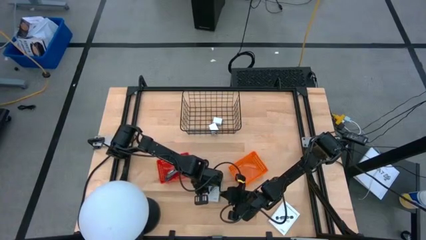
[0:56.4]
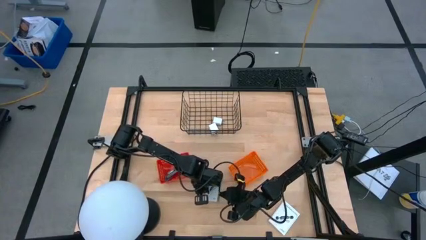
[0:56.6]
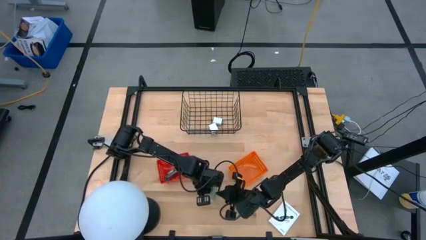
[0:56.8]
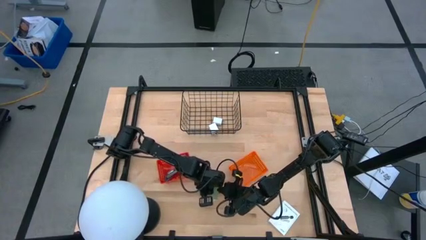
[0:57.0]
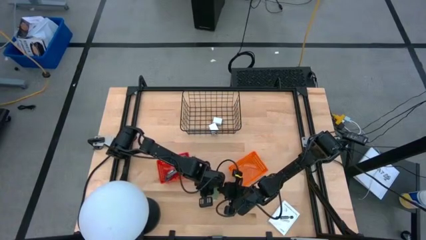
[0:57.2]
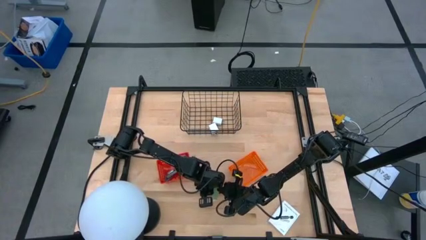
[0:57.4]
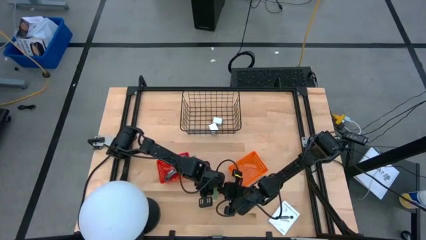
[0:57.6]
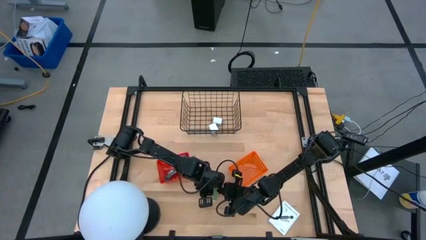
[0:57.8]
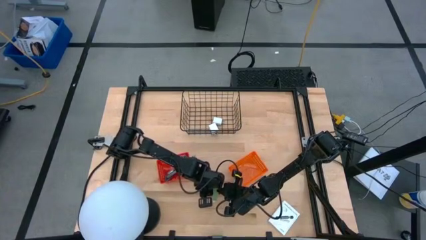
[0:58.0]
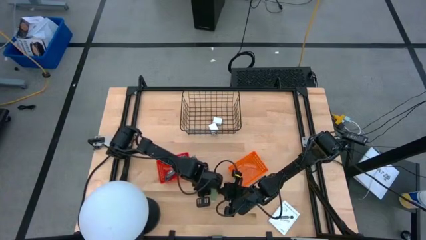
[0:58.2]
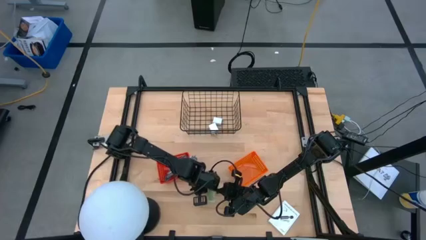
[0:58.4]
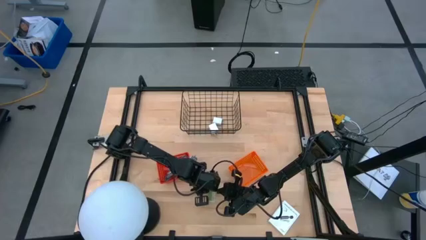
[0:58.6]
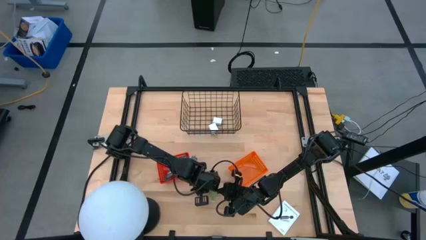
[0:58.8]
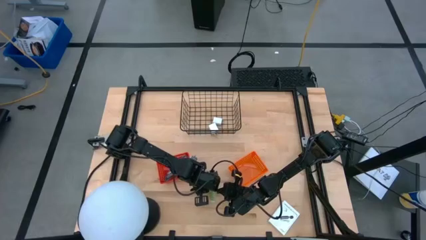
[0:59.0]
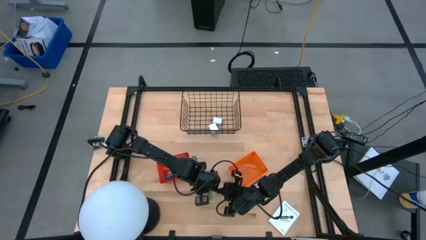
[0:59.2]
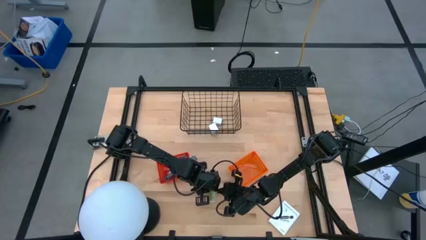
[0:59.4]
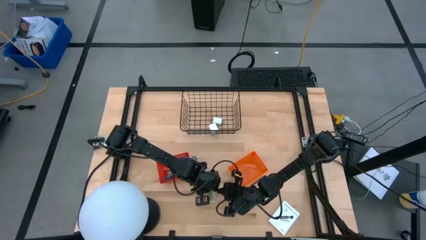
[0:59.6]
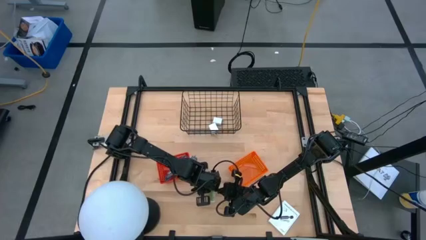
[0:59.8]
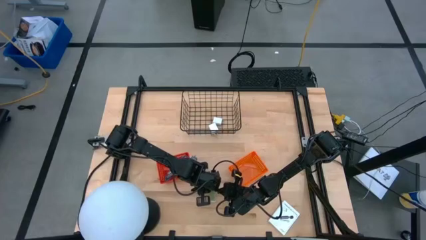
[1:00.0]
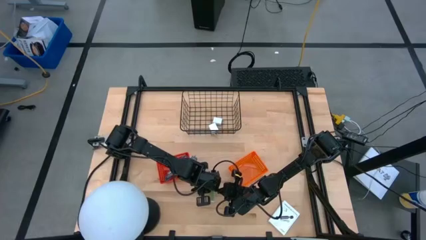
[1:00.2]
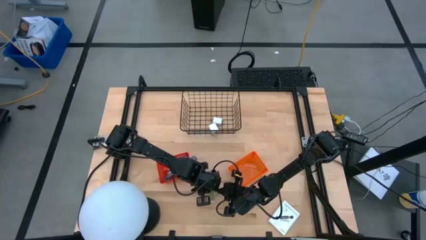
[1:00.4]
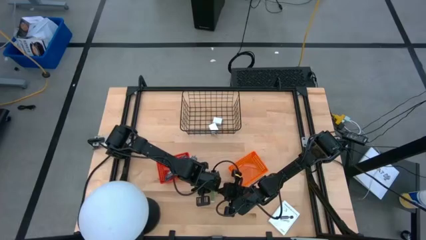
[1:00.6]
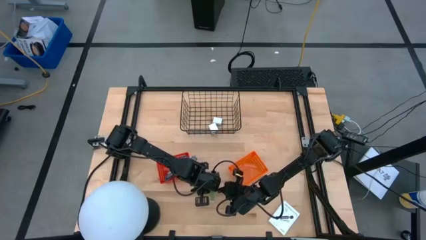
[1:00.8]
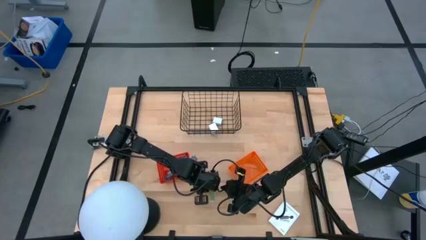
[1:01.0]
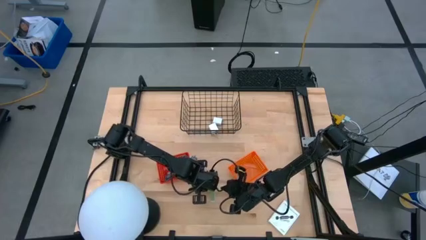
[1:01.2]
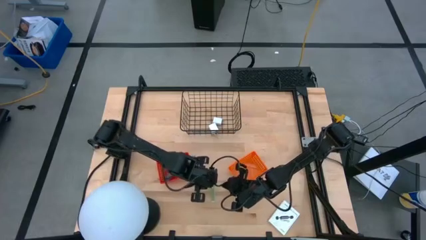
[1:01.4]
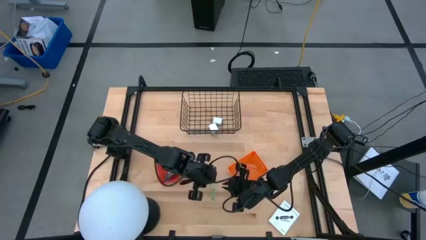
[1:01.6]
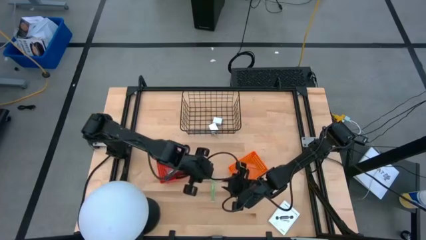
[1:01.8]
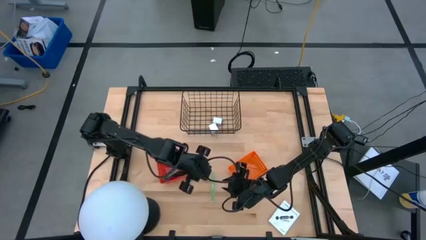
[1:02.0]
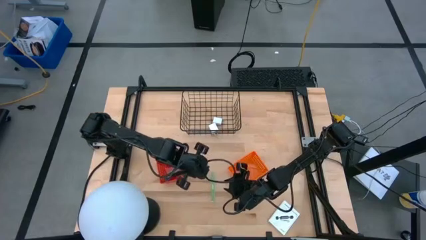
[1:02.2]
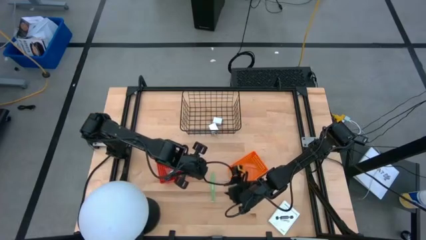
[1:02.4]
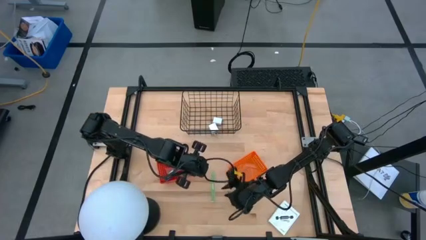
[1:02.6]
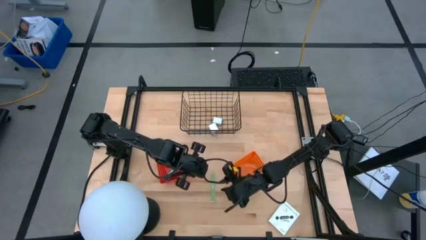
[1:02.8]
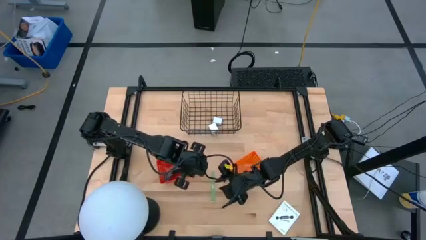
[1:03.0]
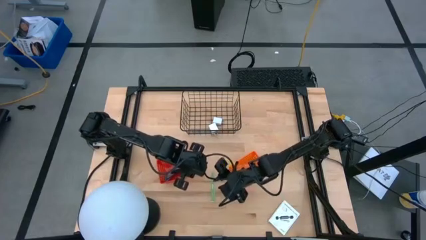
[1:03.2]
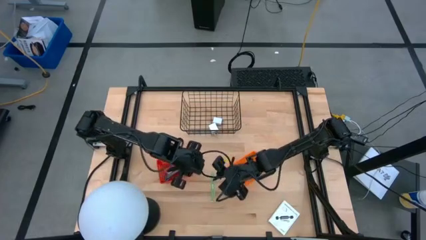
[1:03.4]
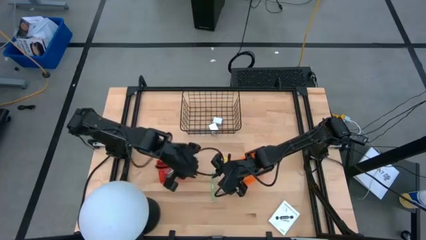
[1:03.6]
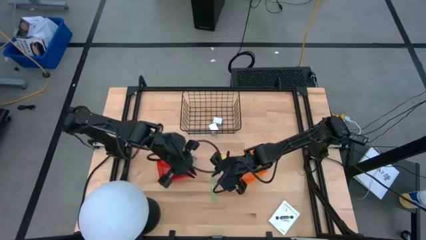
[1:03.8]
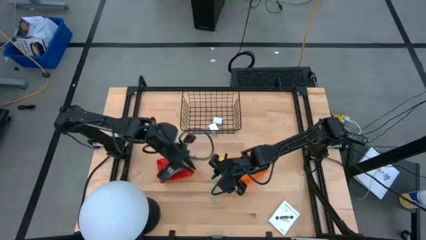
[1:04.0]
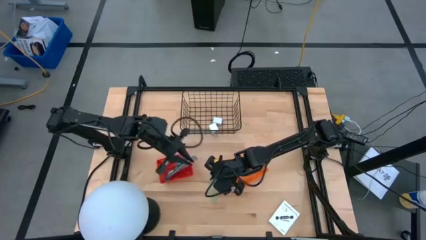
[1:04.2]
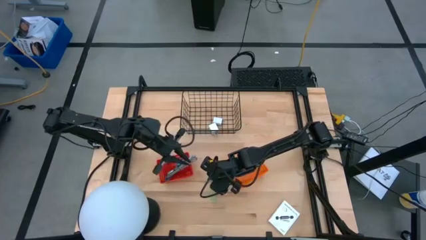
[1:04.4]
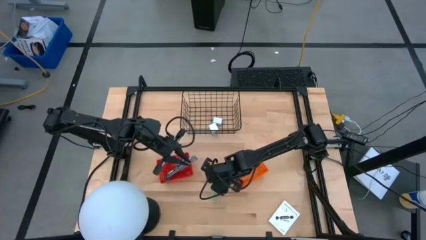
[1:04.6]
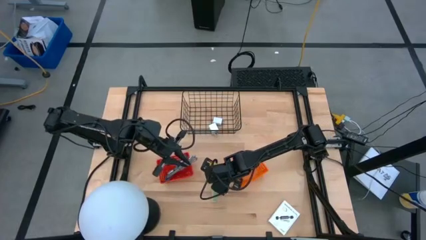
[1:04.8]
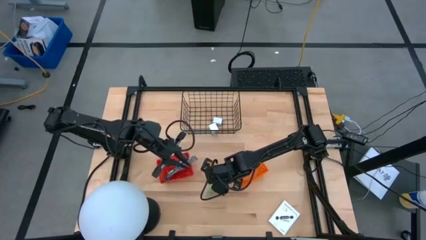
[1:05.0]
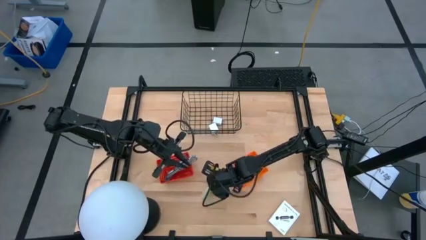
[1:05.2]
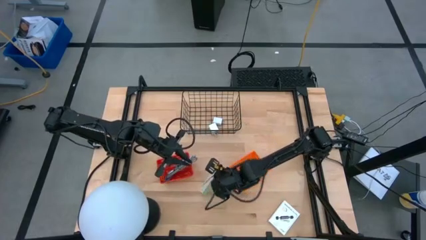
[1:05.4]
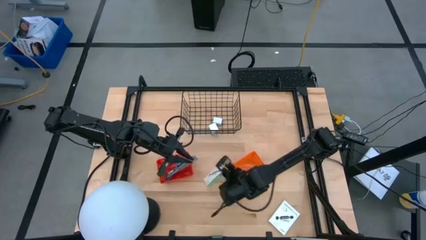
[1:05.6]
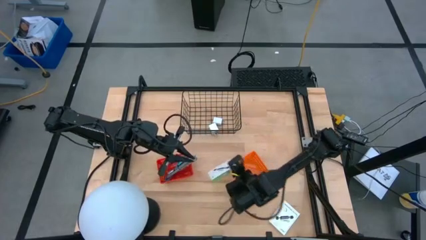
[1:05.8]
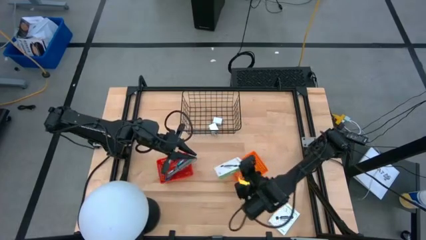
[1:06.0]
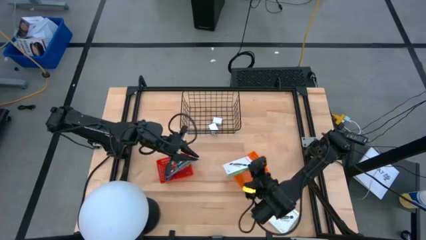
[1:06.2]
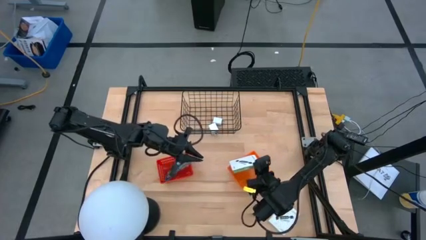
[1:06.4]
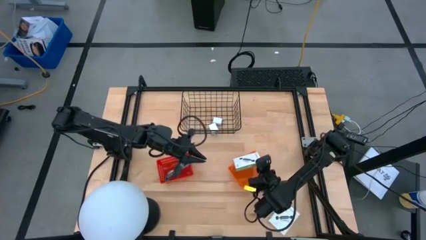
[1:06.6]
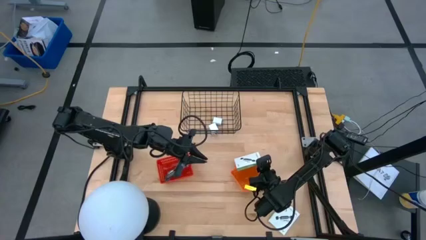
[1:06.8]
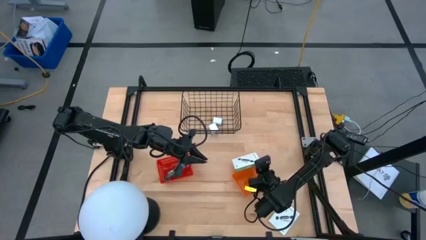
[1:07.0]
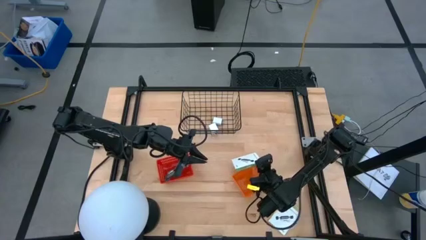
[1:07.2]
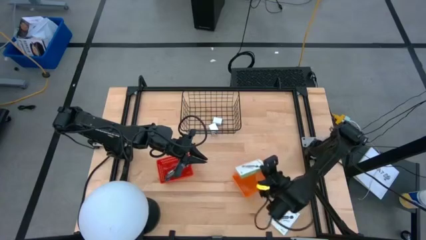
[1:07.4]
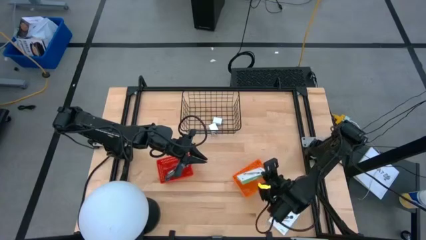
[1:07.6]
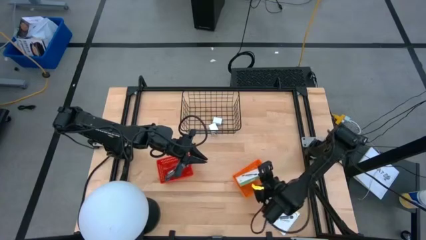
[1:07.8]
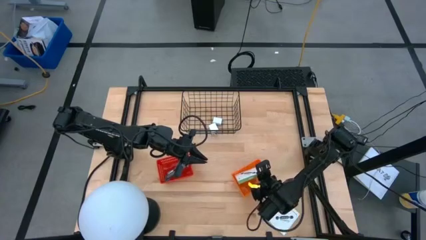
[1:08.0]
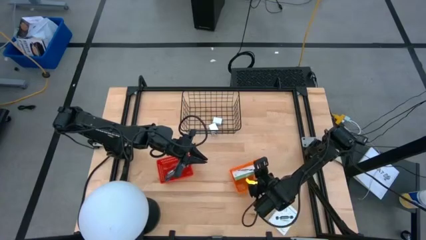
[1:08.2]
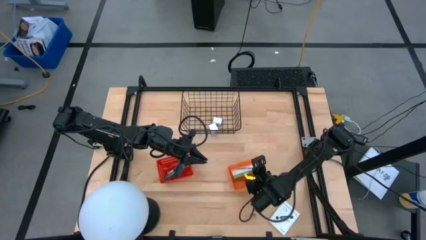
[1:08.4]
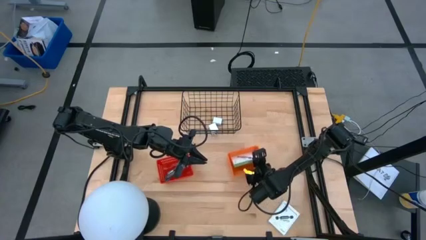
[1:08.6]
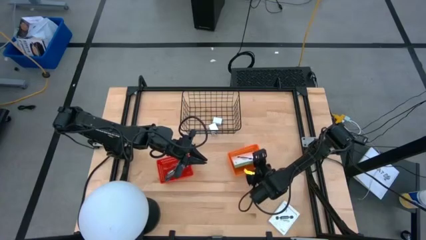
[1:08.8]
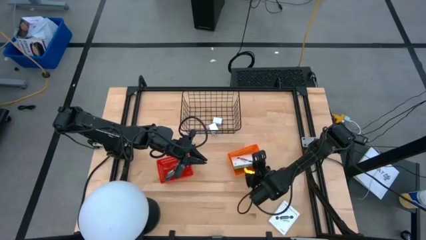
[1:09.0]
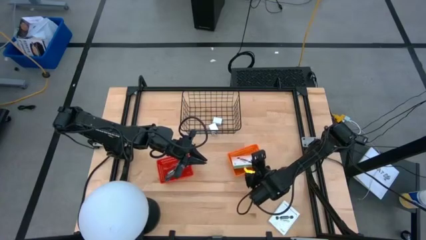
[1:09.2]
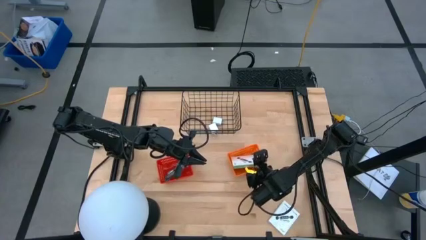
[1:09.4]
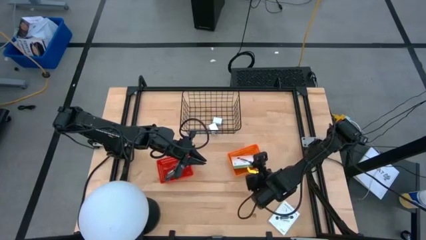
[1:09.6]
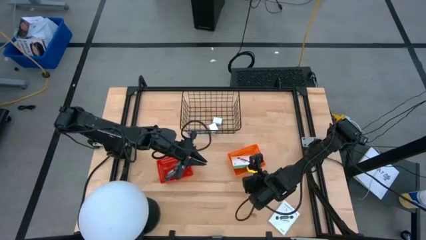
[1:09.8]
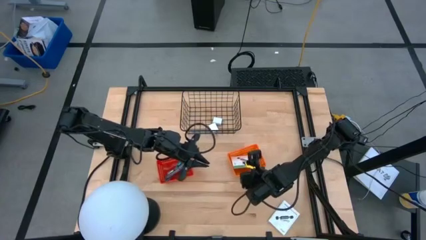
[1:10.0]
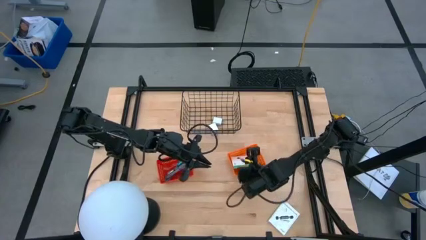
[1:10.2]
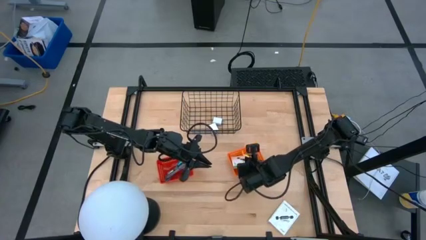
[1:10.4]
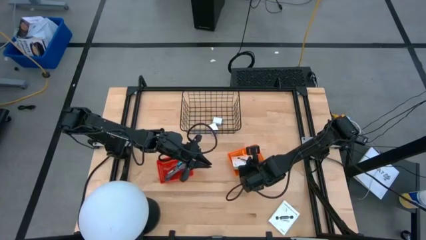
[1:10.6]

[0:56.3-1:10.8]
Task: Pick and place items into bin
Put the top card reader box into the orange basket

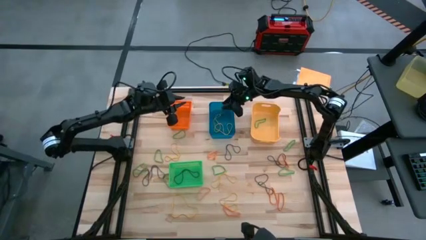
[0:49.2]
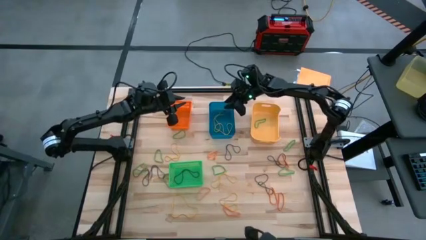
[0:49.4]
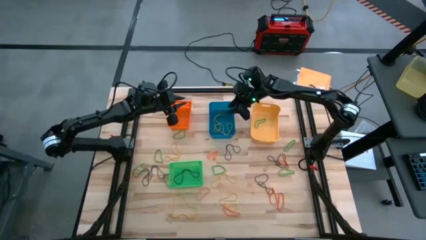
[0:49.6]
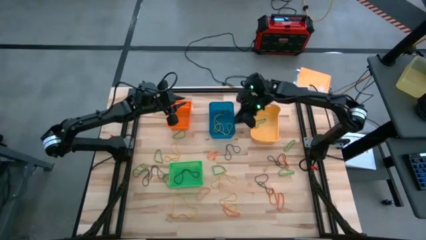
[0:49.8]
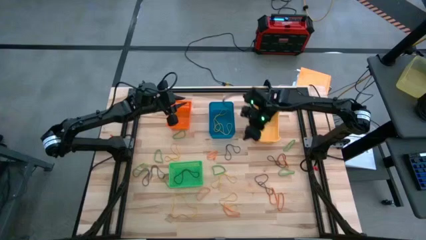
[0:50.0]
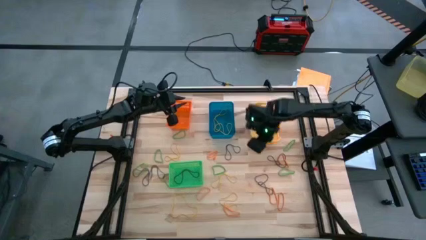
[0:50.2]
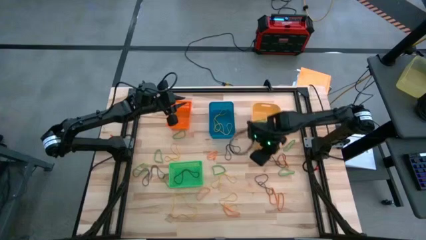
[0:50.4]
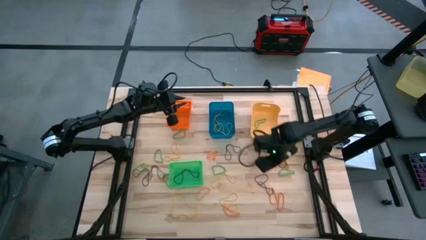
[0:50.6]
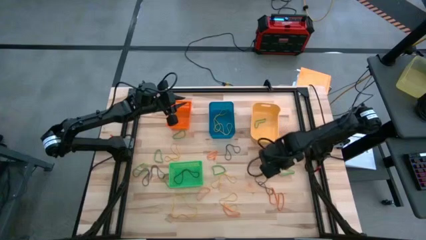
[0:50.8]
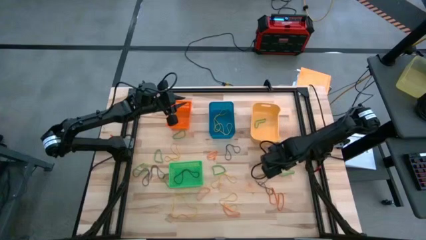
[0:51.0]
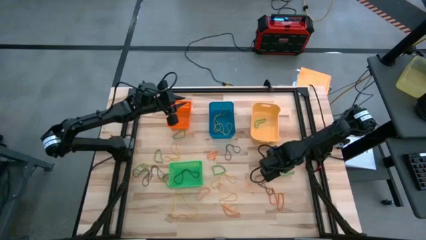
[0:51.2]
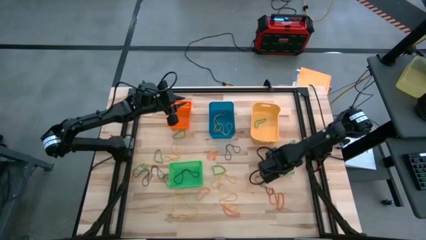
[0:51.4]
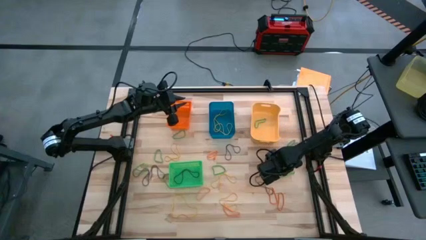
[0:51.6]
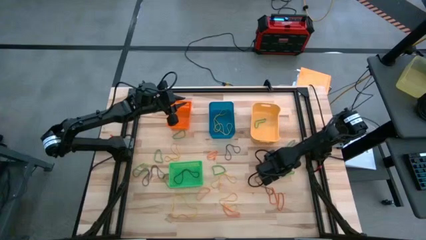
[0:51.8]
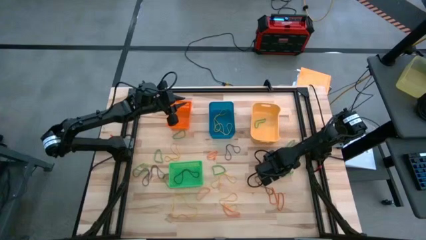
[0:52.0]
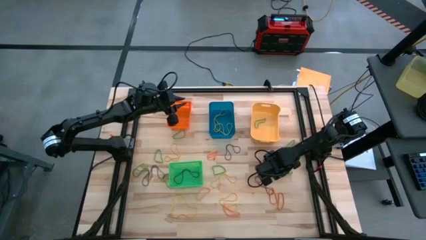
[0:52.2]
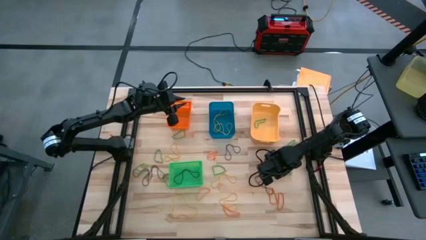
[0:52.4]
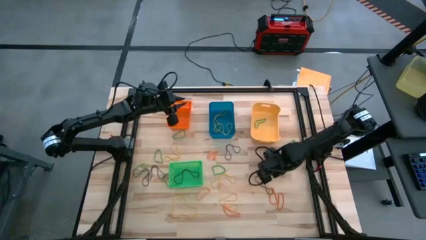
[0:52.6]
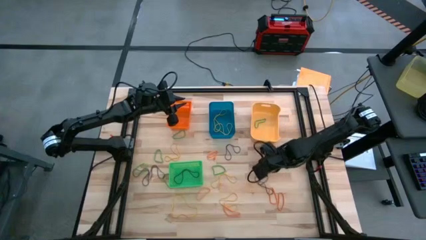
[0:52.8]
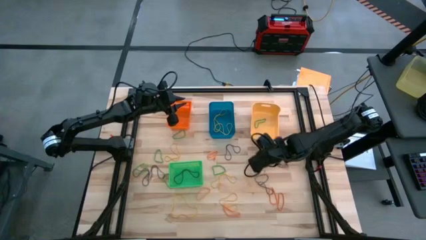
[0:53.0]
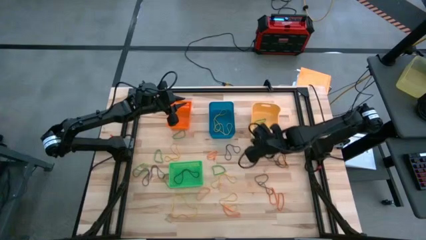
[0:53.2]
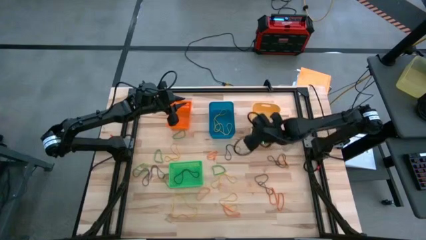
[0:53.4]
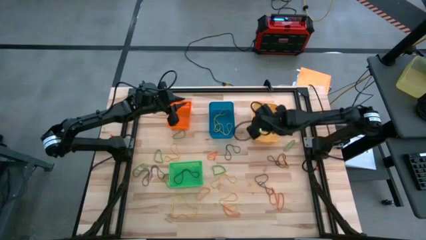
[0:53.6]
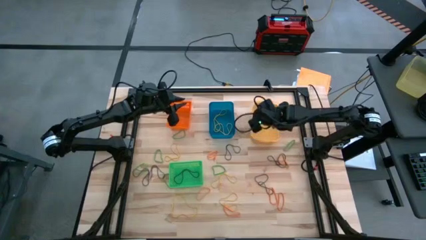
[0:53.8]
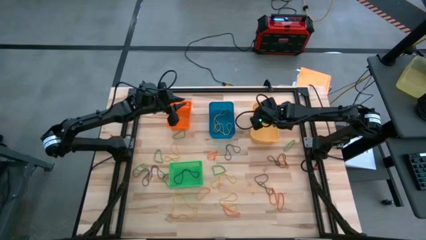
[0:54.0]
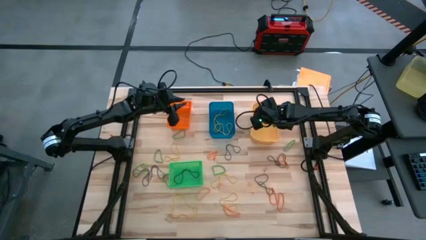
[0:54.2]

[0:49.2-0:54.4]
Task: Sort rubber bands into baskets
Put the green rubberband into the yellow bin
